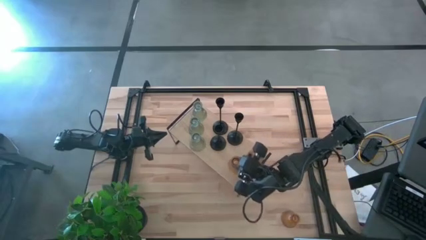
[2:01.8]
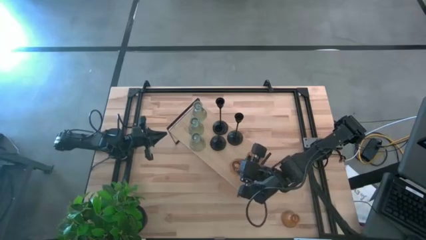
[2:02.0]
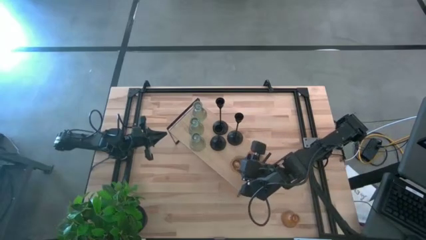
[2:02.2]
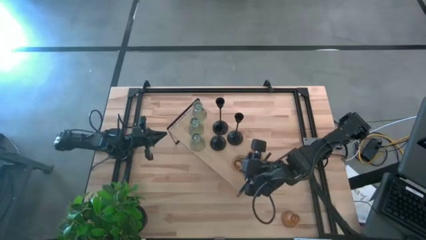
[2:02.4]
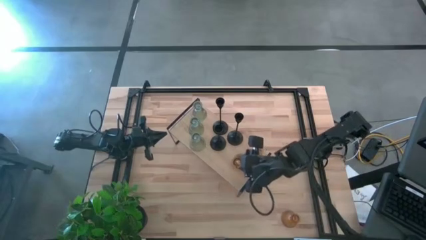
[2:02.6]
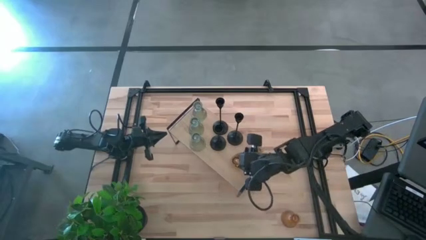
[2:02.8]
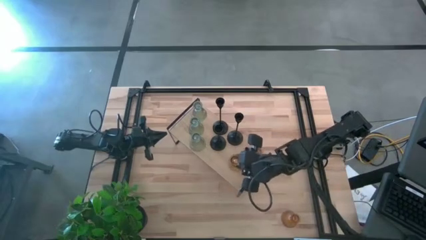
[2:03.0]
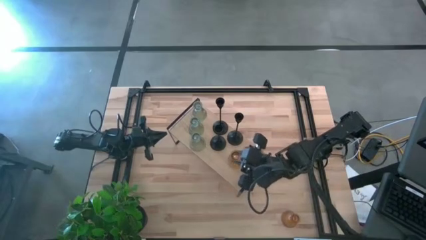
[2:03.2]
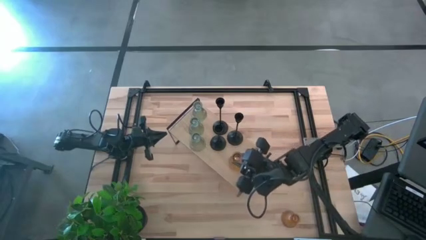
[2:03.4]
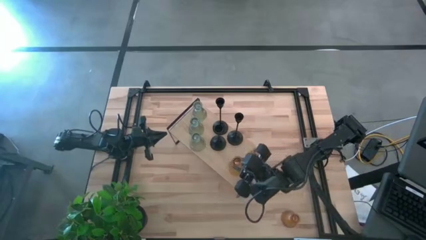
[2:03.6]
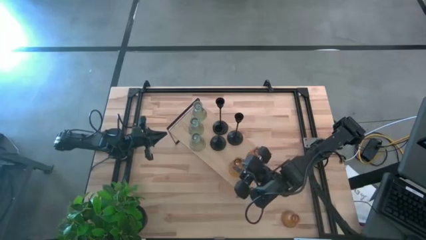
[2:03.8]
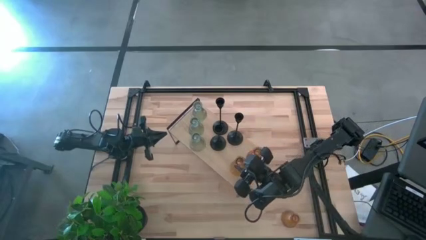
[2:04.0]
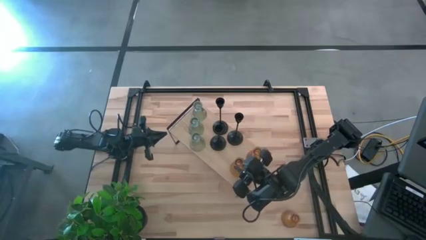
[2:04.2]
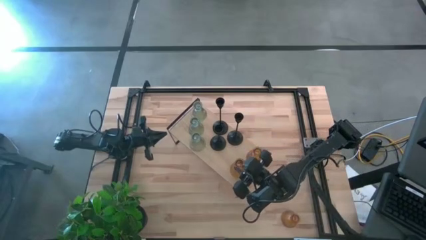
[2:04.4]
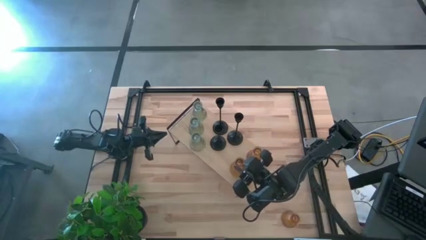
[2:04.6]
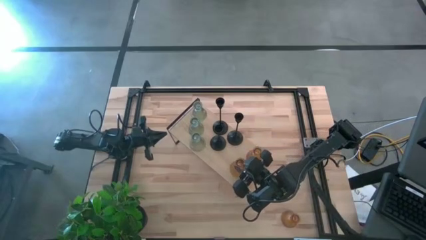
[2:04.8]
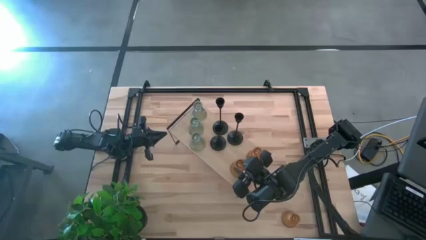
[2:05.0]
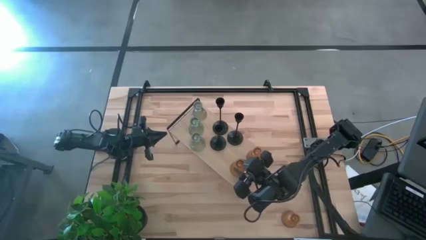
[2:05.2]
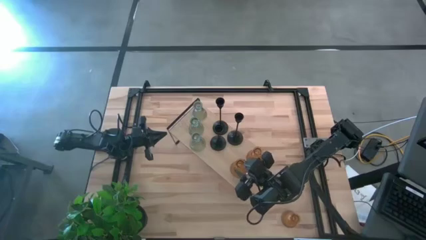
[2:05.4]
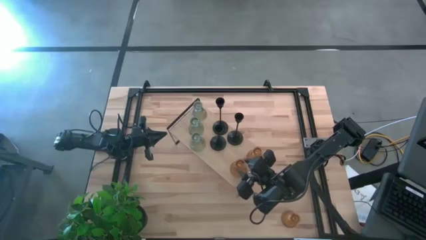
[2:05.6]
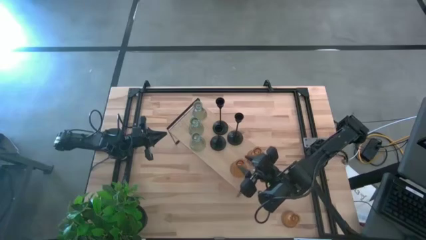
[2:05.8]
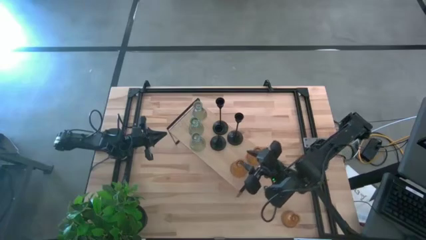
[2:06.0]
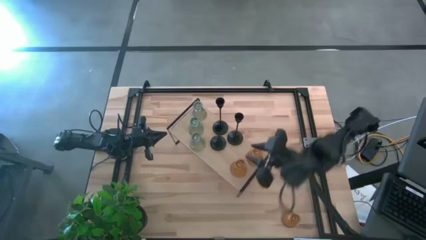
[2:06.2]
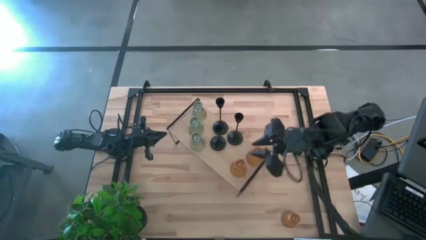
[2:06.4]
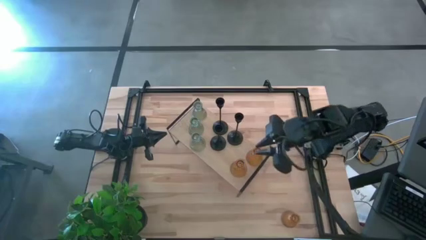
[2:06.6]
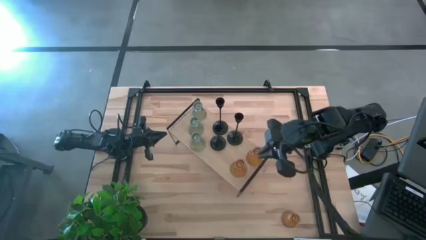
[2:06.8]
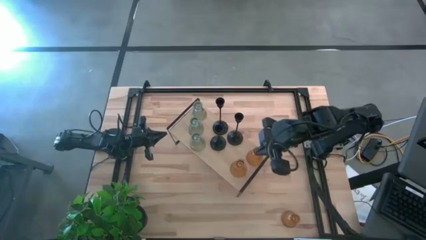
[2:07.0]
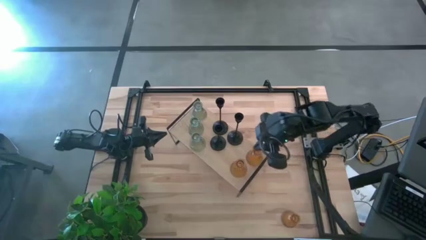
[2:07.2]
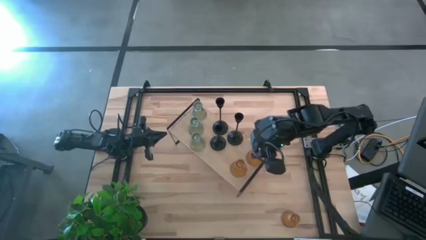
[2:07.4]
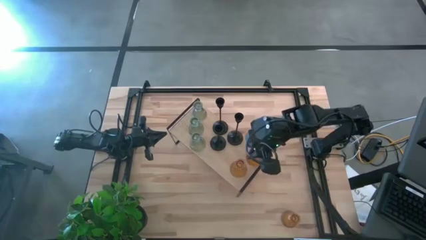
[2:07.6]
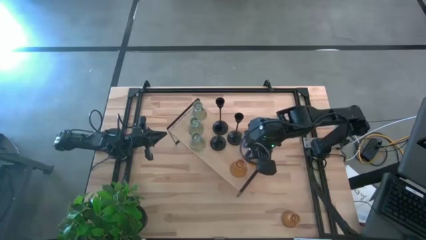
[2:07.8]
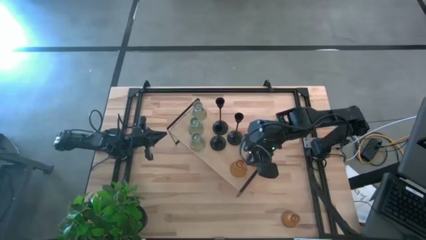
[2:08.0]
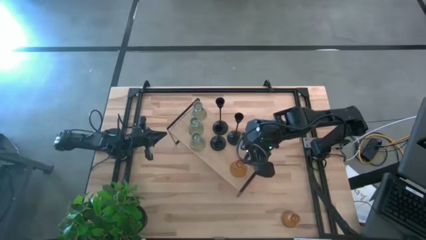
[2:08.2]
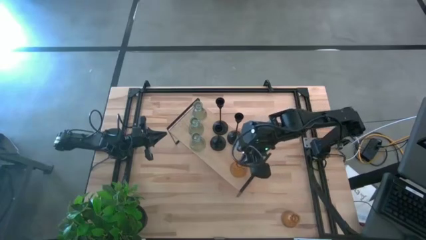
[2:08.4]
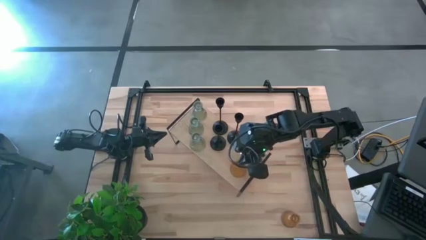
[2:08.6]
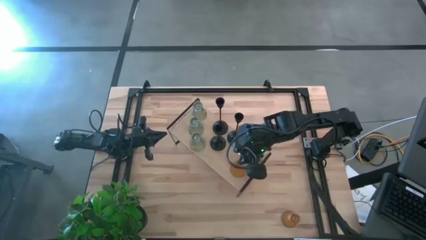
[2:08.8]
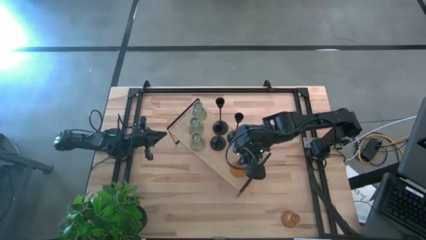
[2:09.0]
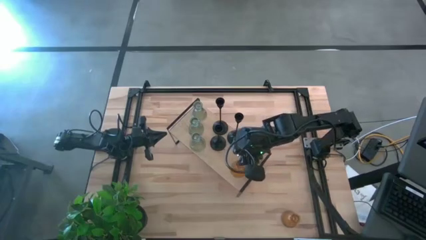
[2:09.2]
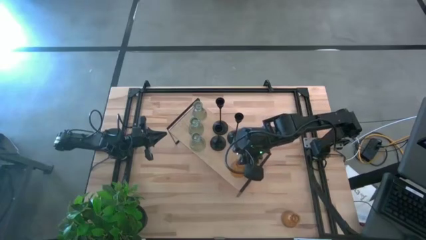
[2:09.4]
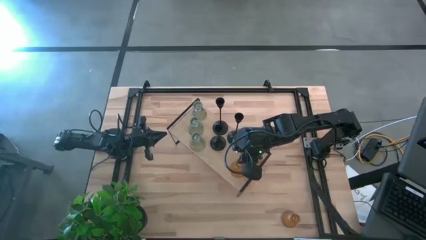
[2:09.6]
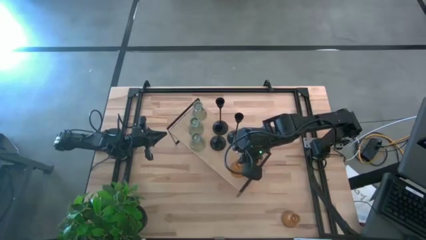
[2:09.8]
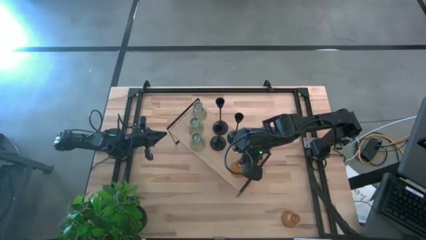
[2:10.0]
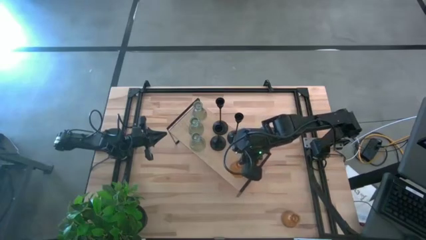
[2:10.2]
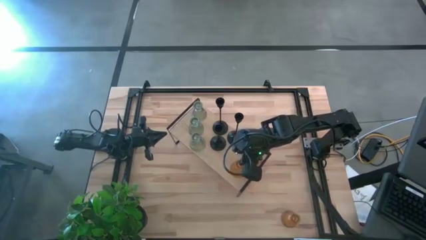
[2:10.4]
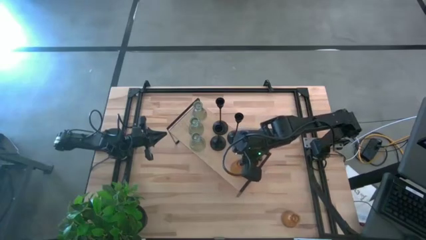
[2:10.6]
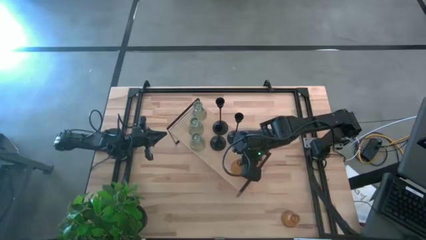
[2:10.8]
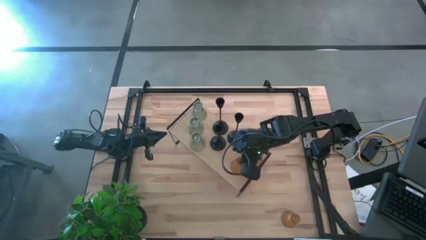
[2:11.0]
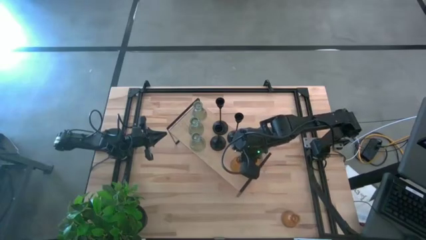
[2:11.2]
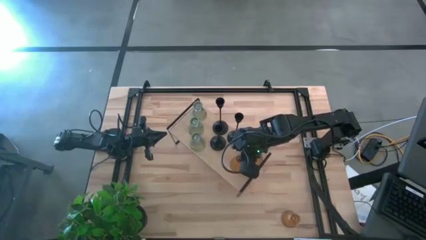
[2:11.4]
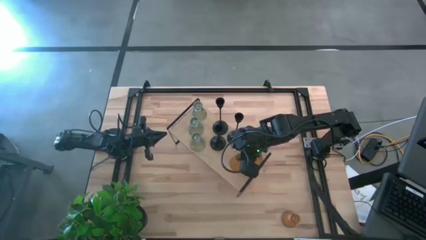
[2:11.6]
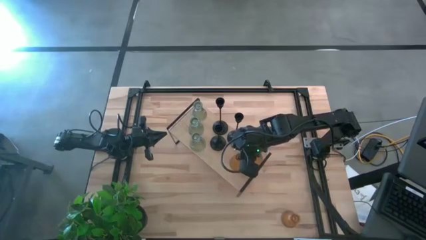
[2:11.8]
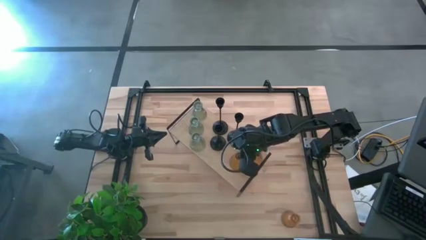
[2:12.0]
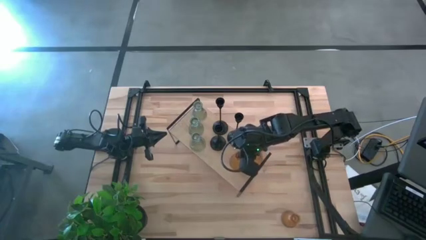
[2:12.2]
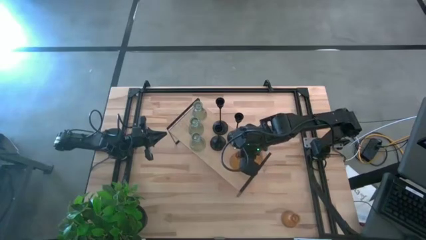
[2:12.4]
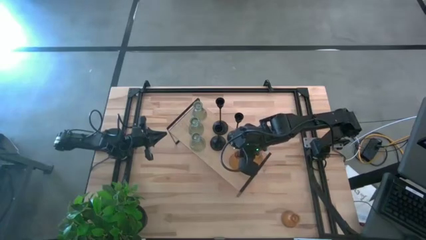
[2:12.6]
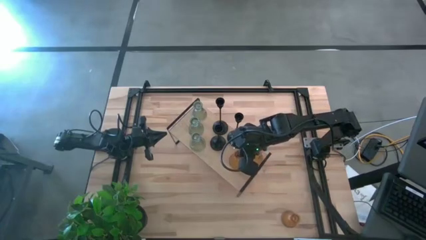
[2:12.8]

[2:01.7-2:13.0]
Task: Pick & Place candle stick holders
Put the top orange candle holder on the shelf

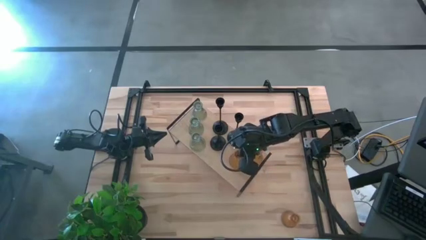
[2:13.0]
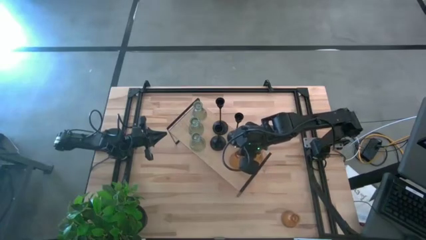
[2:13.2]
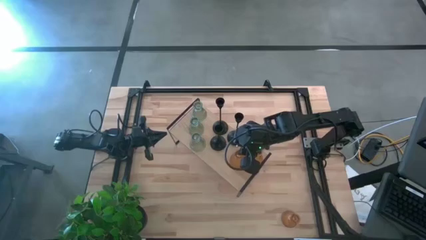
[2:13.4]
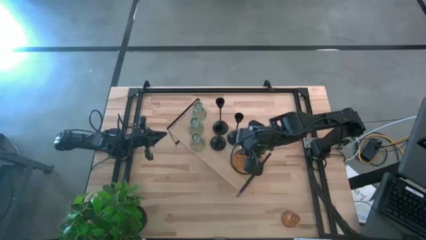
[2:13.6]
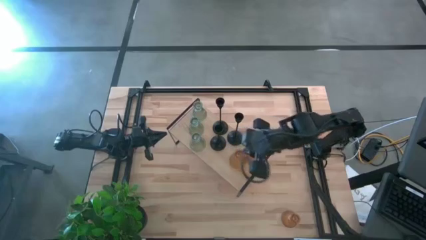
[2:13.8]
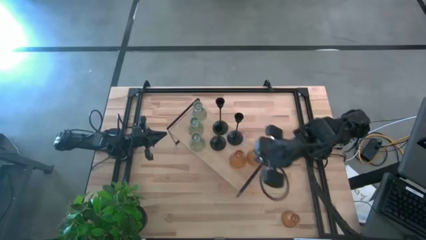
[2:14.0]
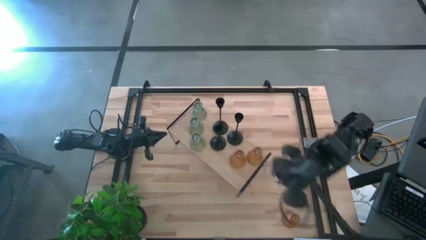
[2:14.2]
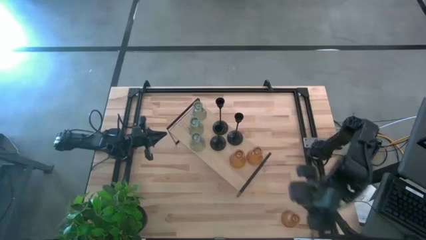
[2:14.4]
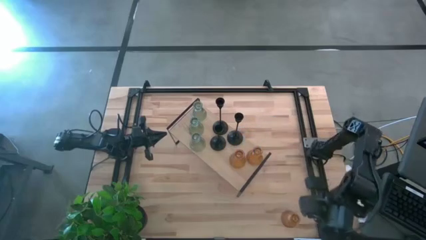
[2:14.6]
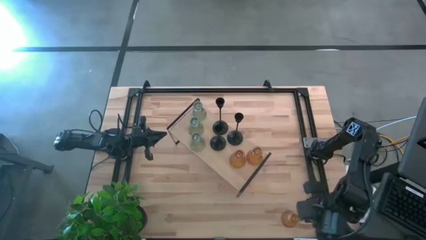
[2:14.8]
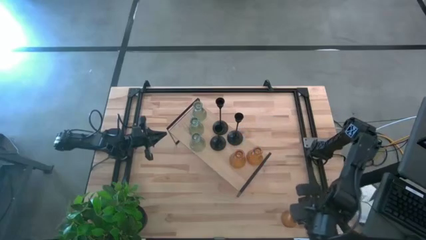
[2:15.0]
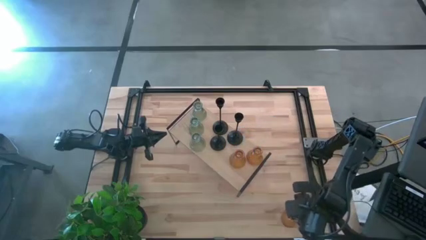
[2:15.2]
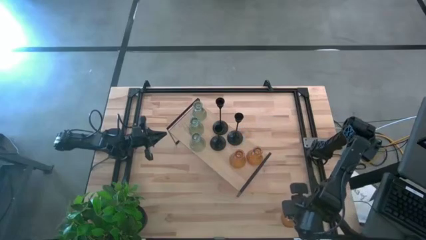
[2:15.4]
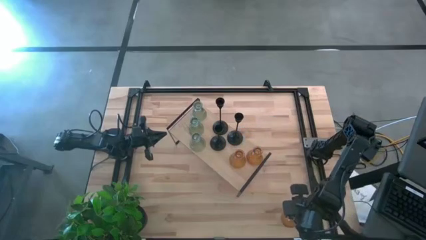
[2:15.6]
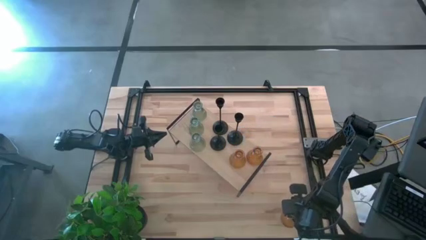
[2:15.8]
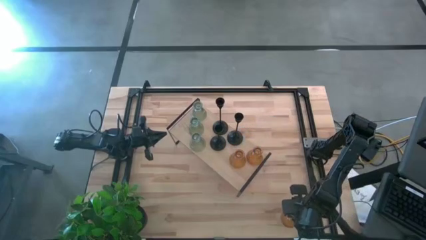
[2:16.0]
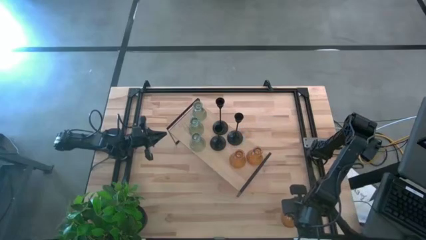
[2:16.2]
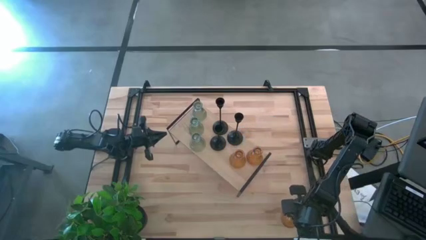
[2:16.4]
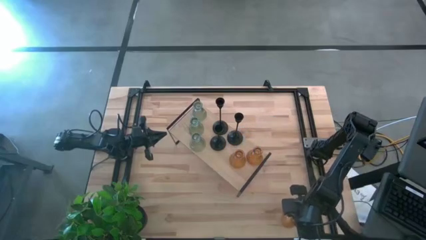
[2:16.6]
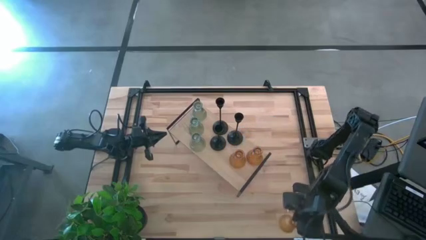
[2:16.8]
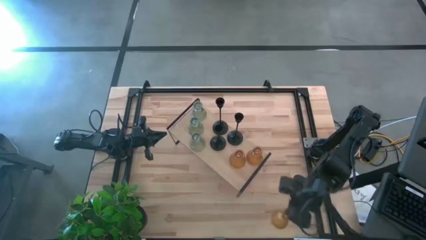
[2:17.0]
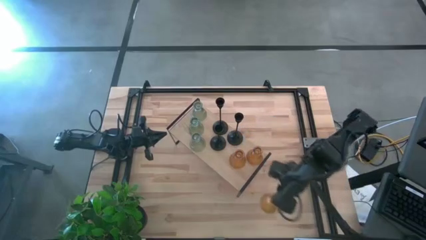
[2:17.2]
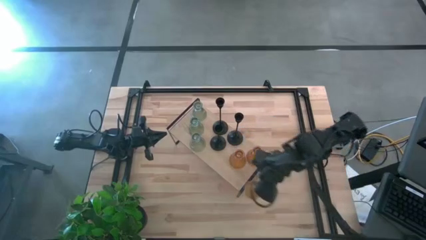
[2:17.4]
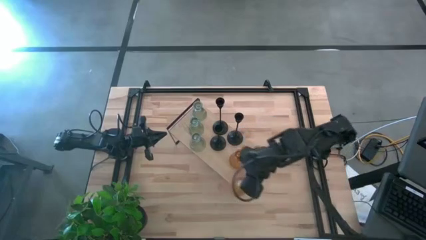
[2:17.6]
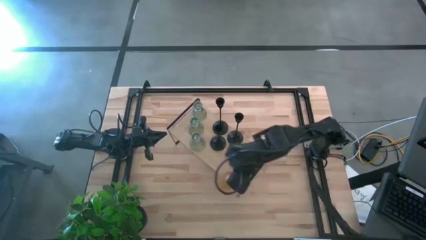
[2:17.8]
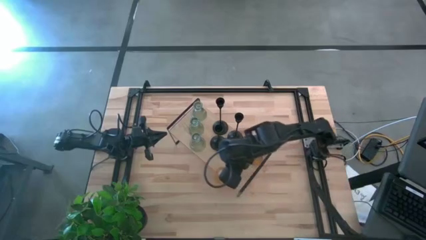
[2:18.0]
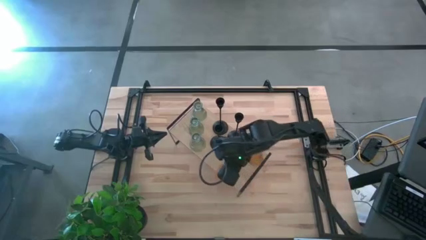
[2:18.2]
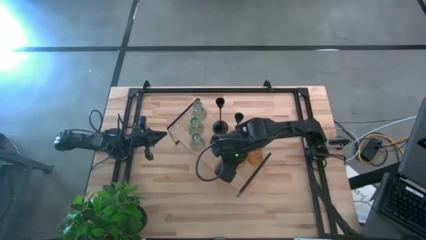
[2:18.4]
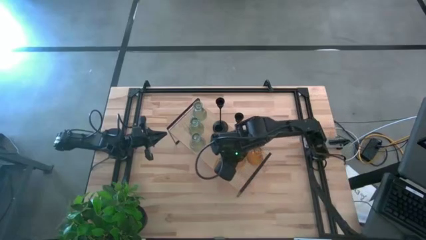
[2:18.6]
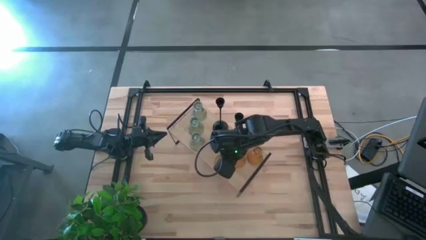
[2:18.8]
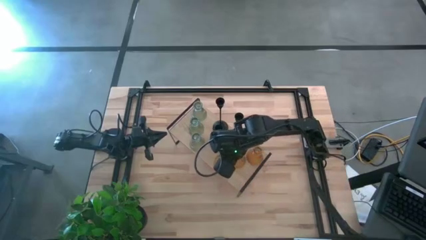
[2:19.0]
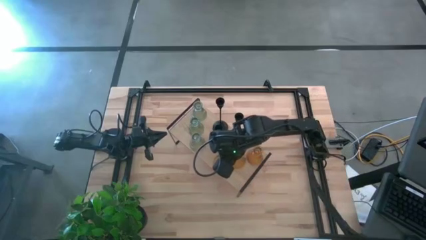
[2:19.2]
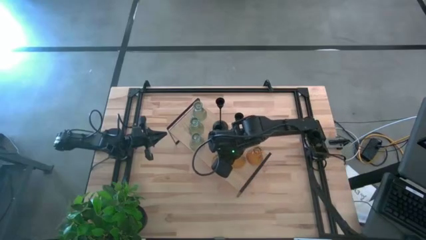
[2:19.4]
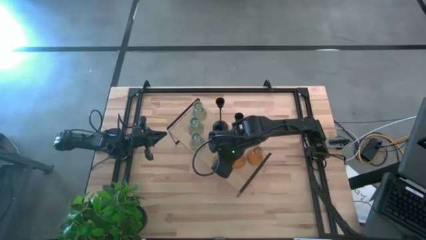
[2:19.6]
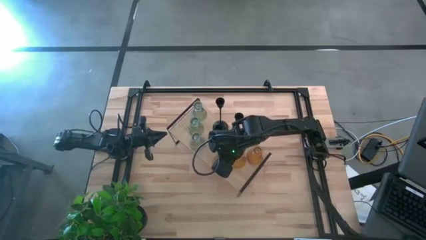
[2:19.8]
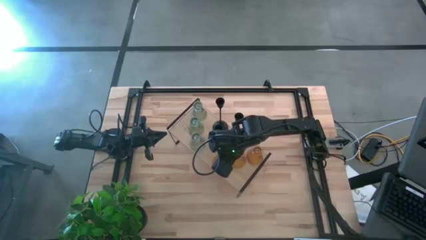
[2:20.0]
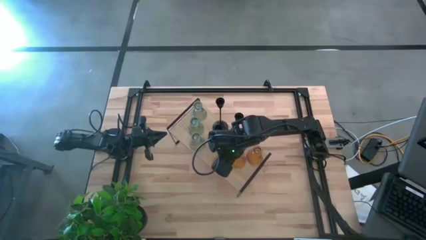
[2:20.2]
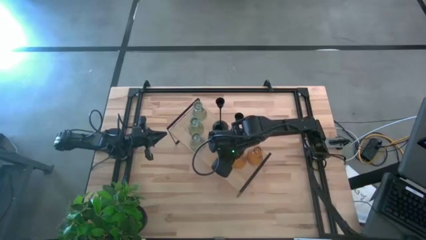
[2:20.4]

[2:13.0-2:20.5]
Put the orange candle holder on the shelf
